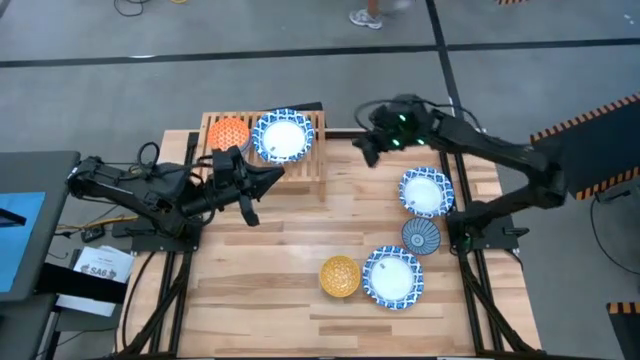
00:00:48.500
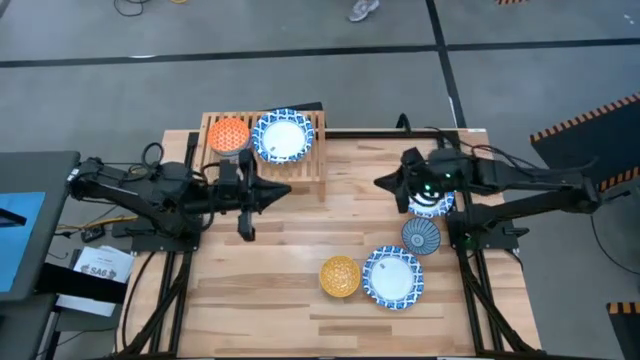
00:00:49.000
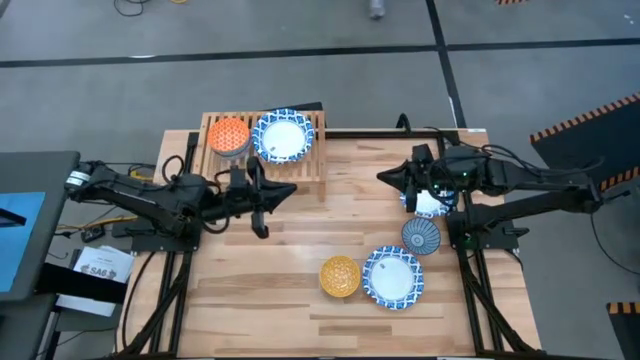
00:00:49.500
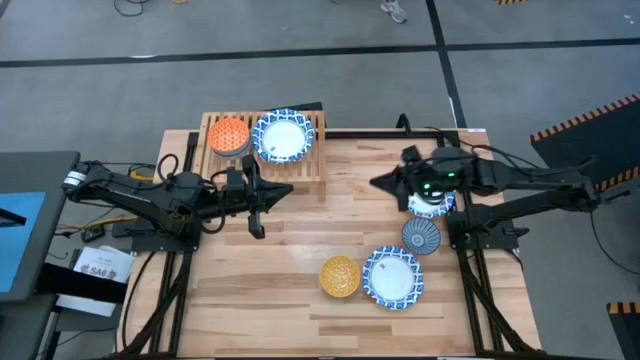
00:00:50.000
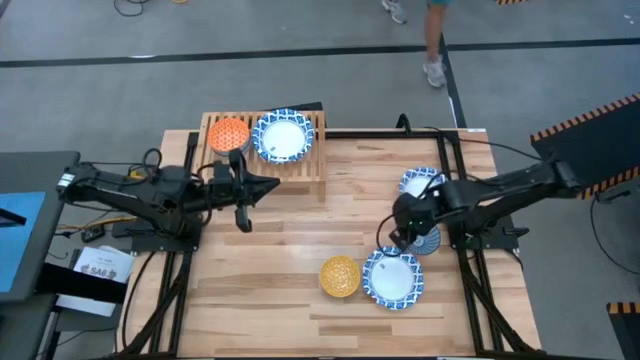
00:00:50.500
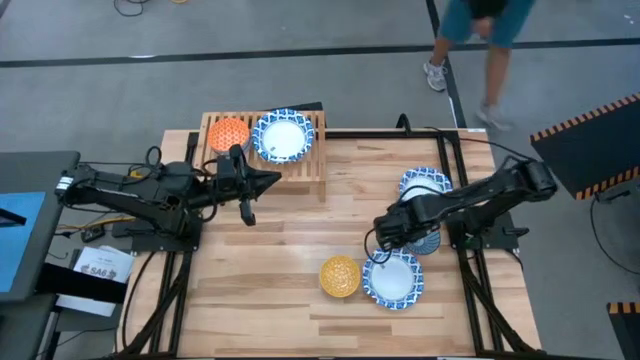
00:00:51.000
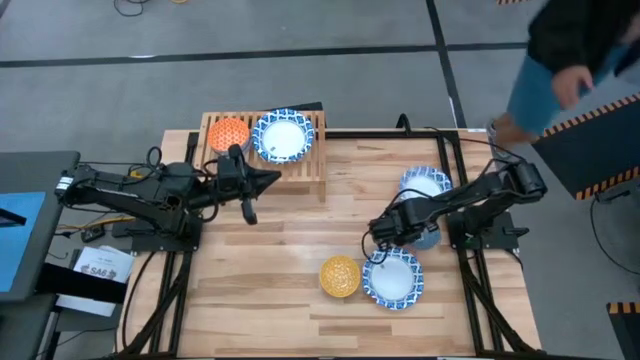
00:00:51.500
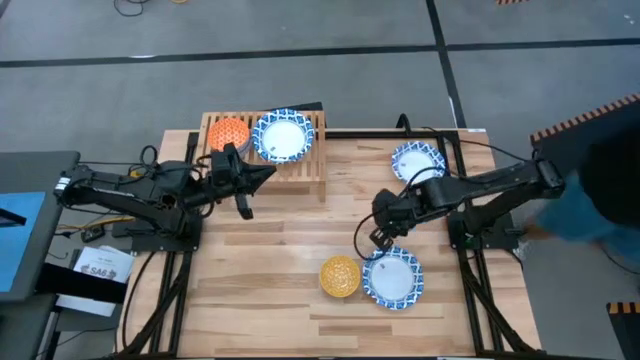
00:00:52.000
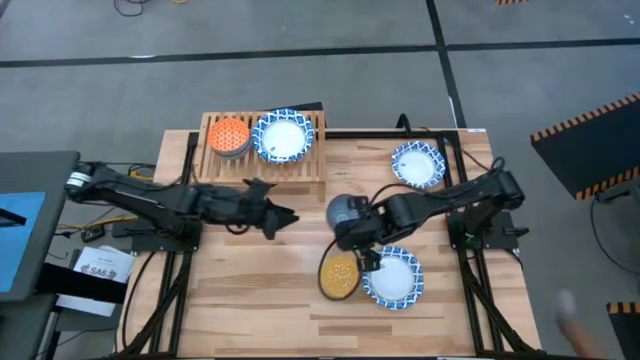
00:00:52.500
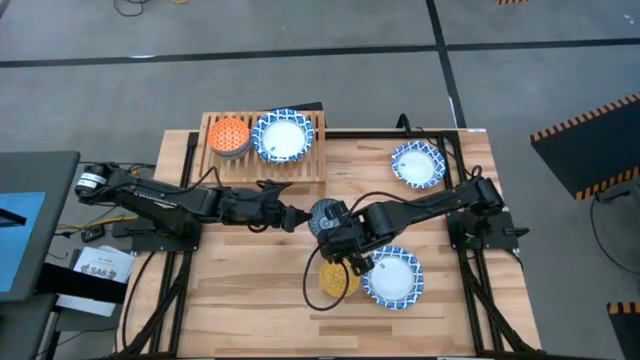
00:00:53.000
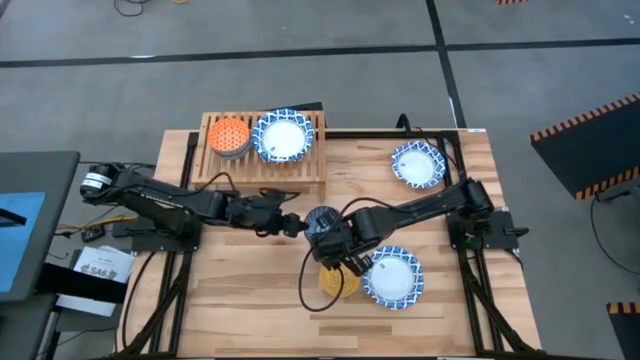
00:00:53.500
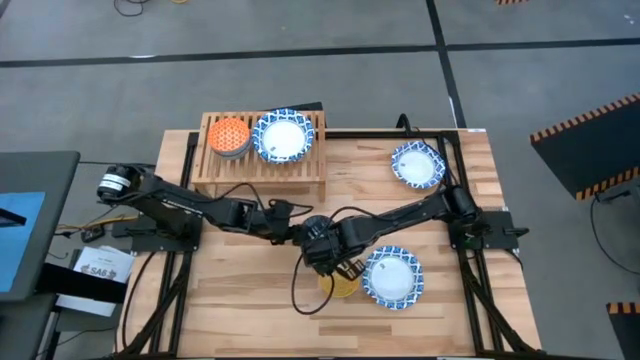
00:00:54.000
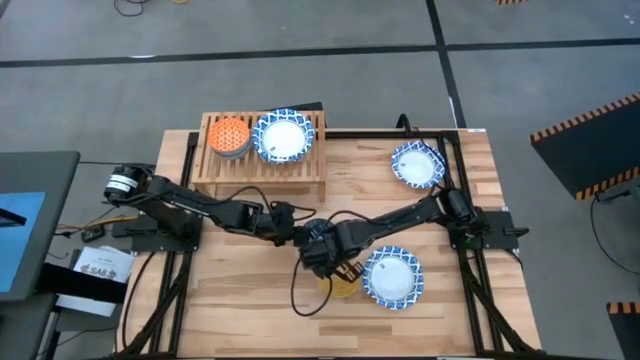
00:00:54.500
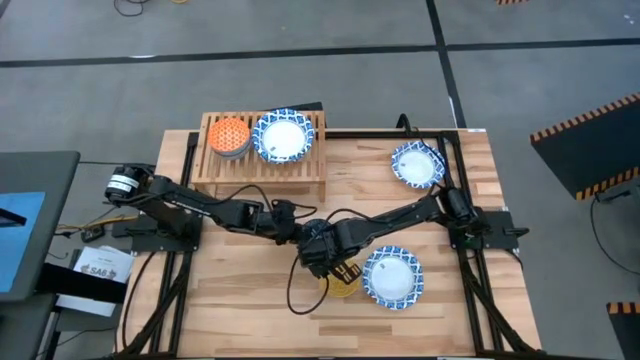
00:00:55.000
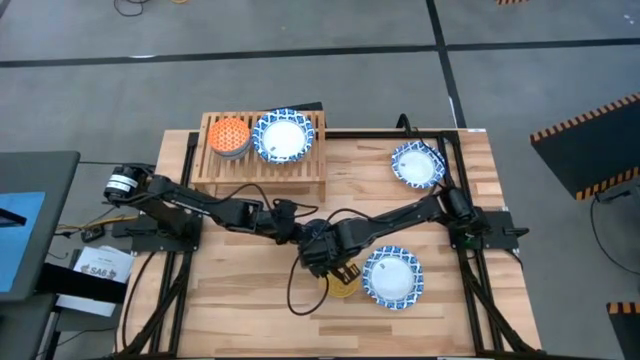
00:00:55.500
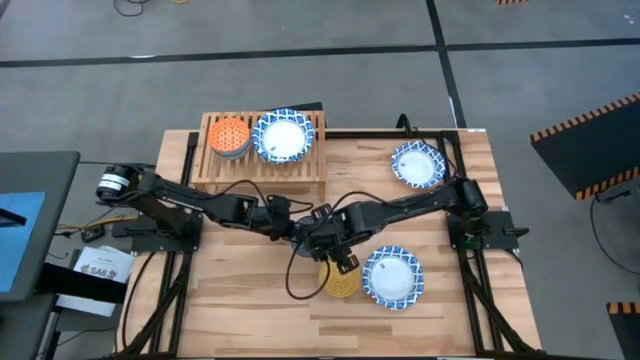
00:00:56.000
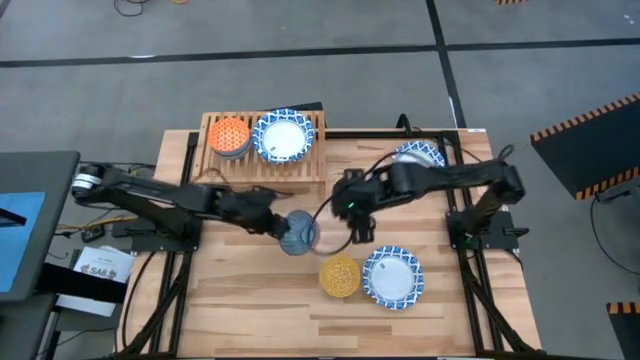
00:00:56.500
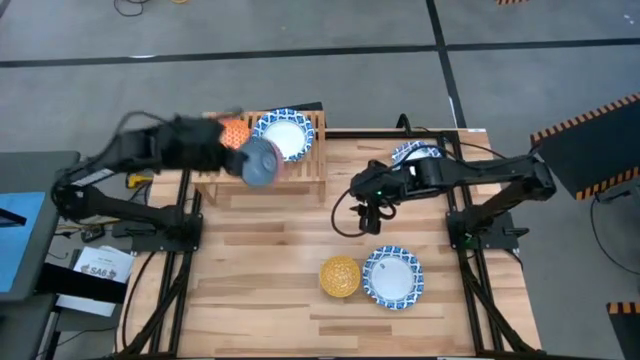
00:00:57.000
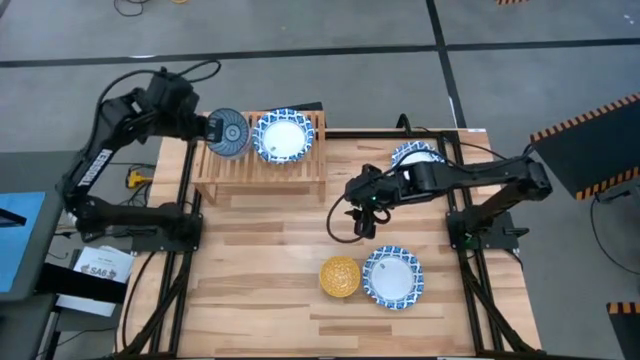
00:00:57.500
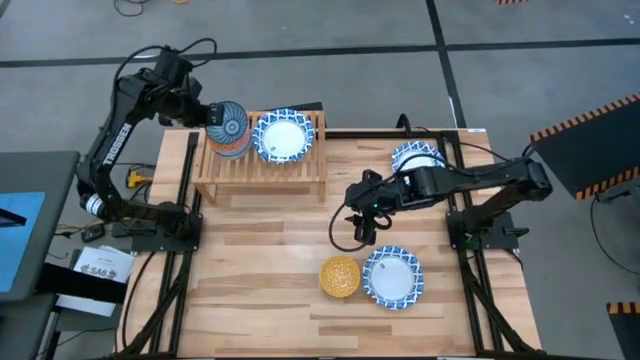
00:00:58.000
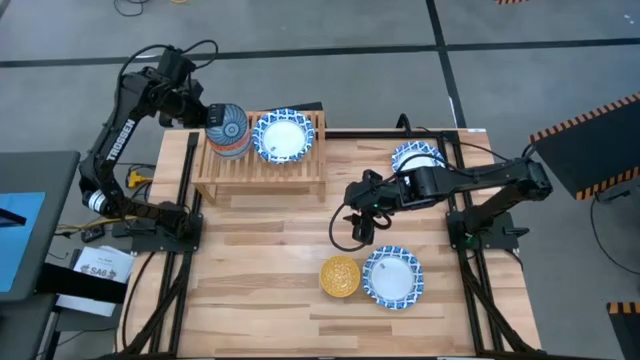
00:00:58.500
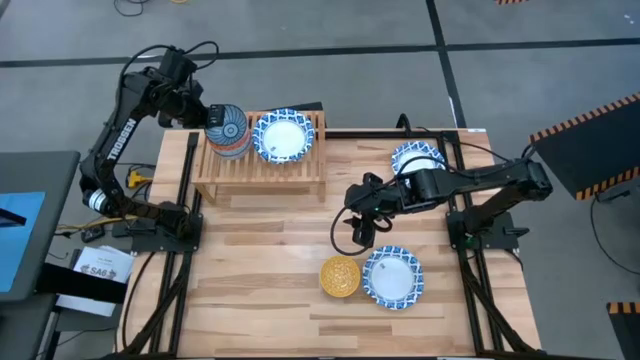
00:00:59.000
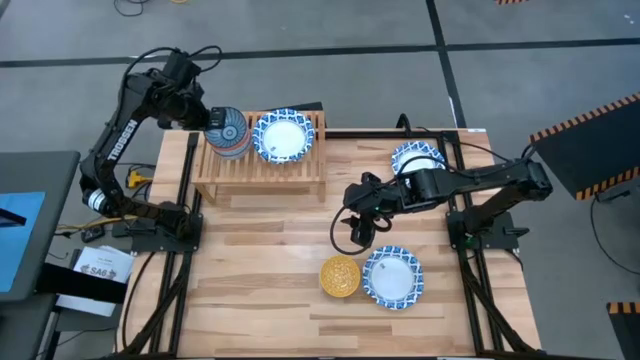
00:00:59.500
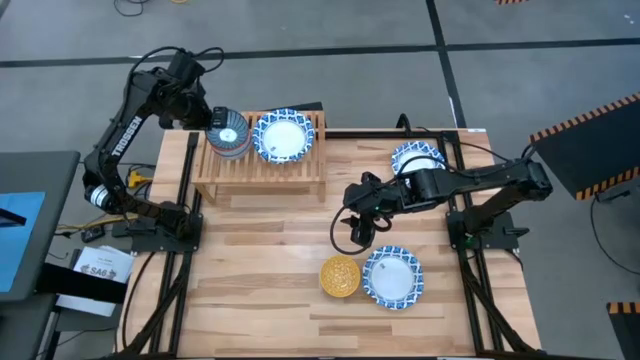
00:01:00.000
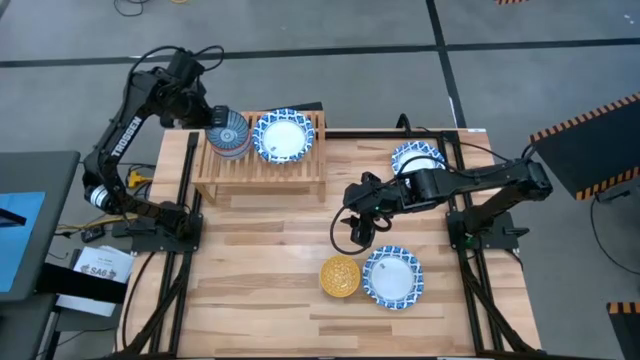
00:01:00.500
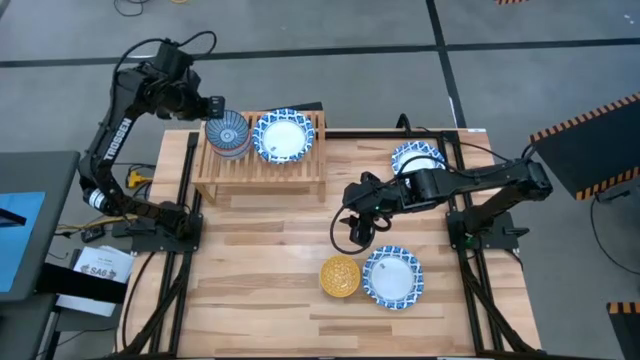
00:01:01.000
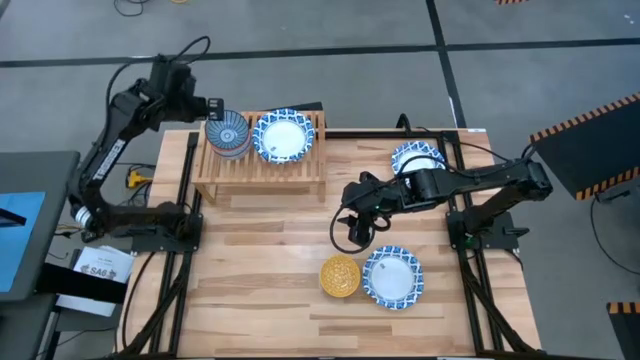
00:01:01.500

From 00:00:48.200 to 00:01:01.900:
Task: Place and stack bowls onto a shelf
Stack the small blue bowl on top of the small orange bowl on the shelf

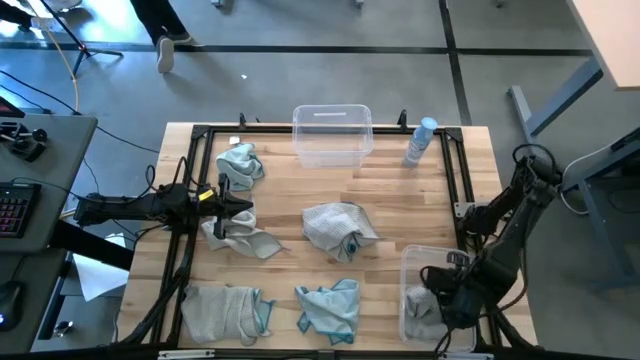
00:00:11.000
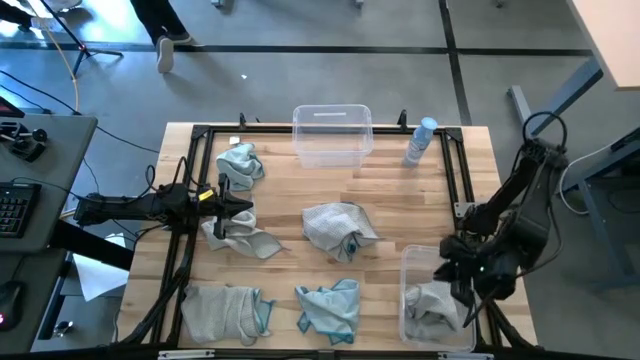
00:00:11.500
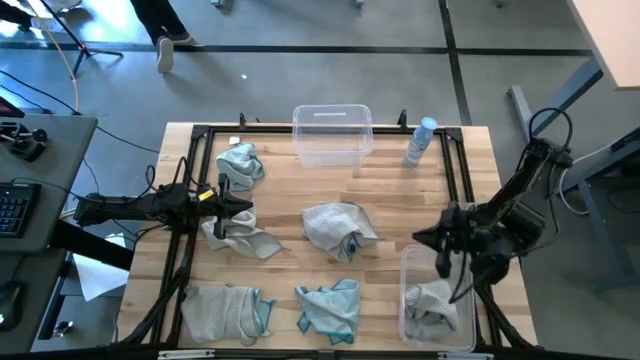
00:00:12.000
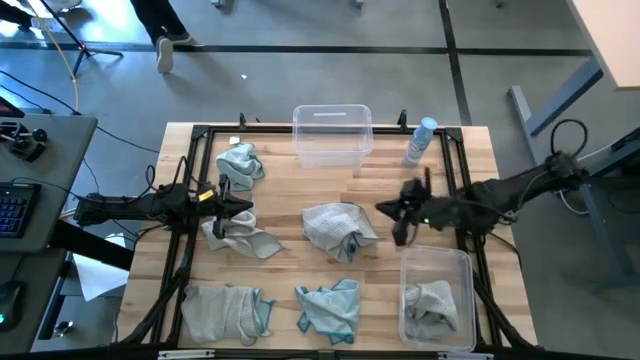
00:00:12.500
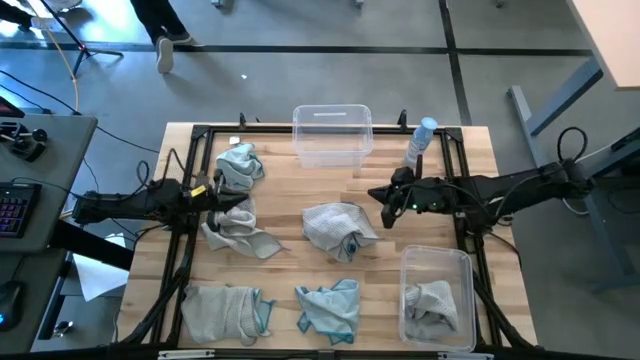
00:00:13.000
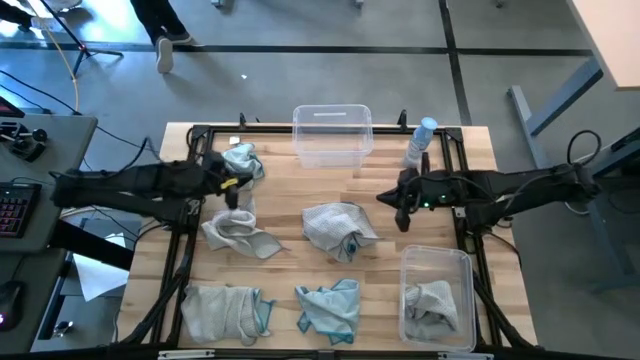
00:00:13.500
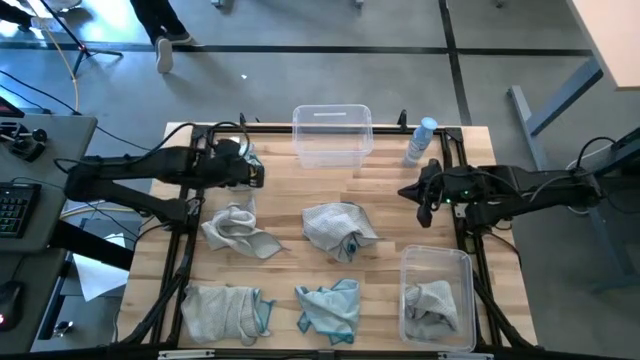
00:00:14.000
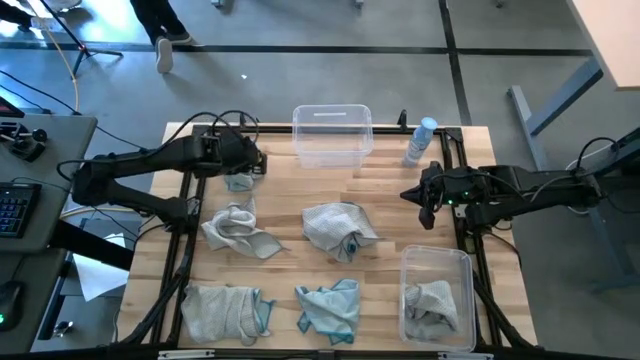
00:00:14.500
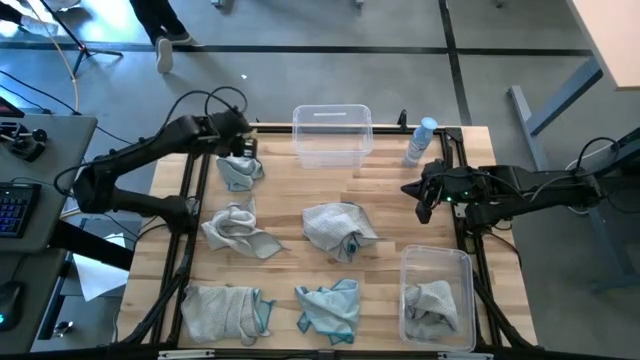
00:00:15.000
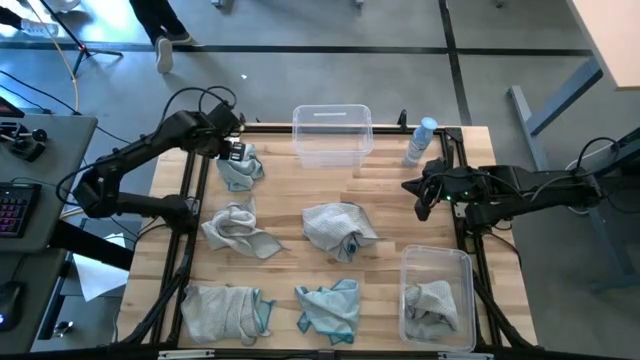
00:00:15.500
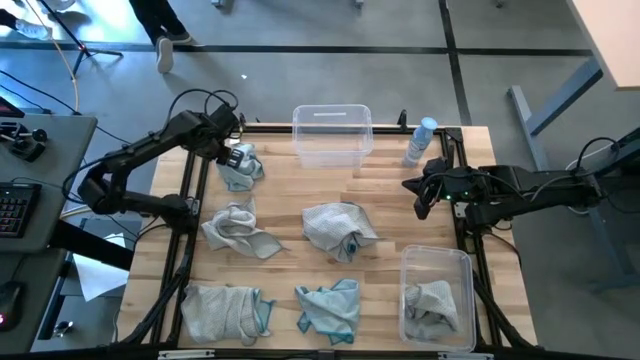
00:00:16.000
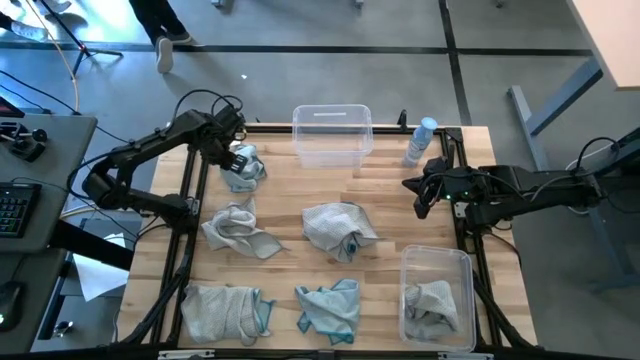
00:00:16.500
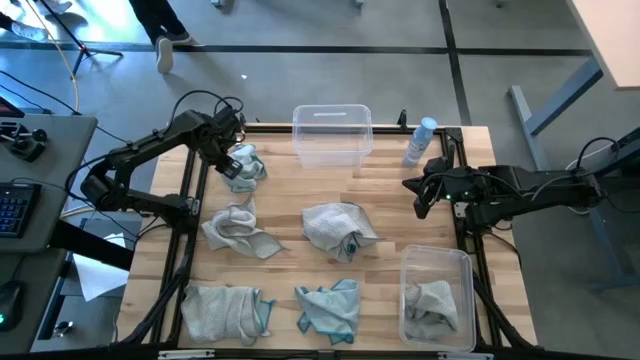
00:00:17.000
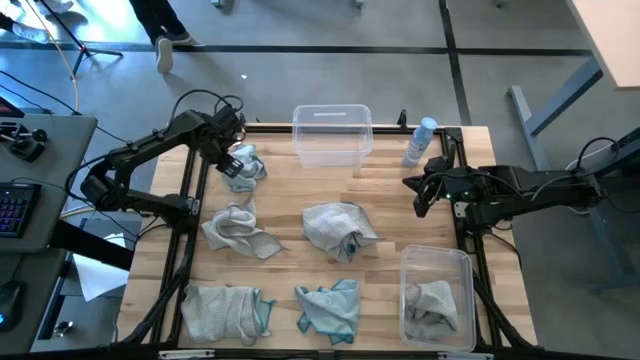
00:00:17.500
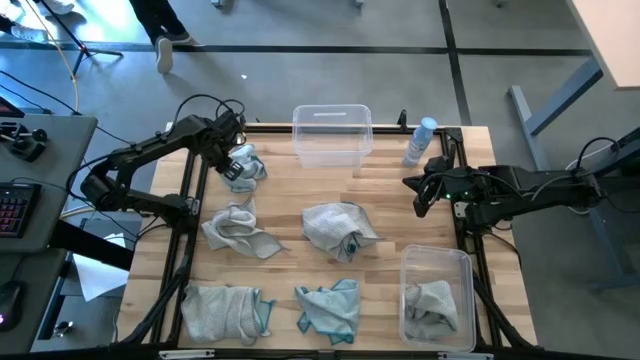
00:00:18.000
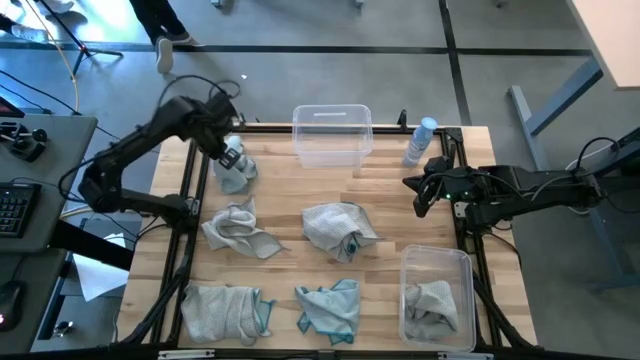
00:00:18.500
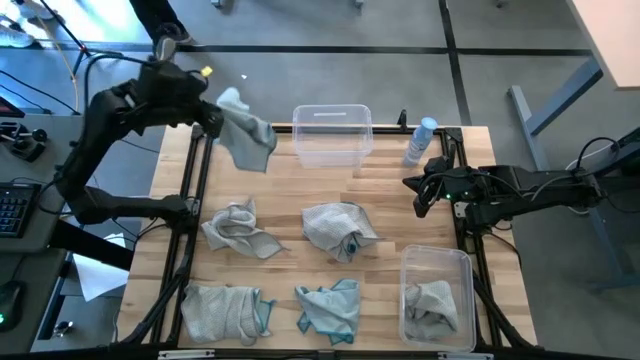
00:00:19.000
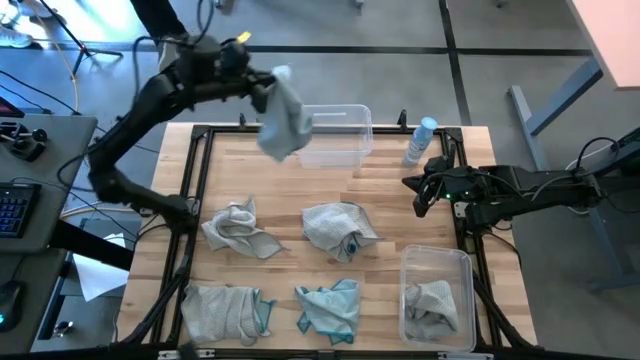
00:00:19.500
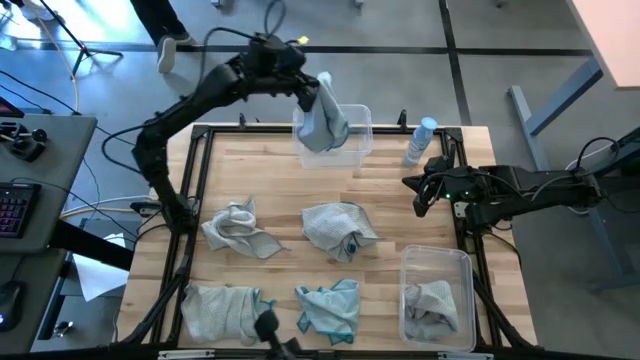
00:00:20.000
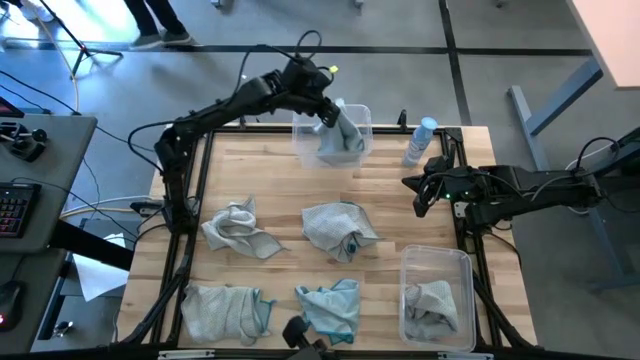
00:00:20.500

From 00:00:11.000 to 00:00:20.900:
Task: Sort microfiber towel by color & place in baskets
Put the blue microfiber towel into the top transparent bin
